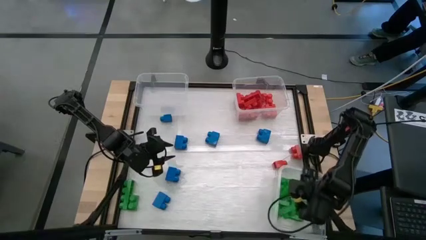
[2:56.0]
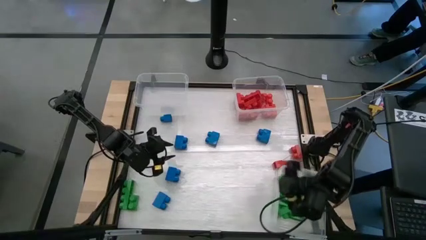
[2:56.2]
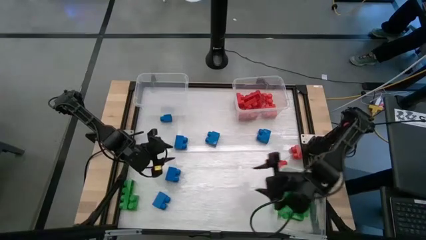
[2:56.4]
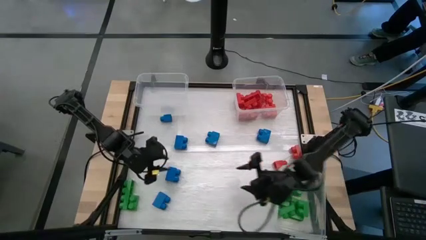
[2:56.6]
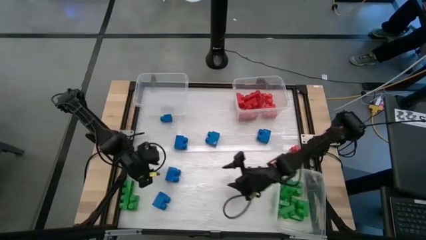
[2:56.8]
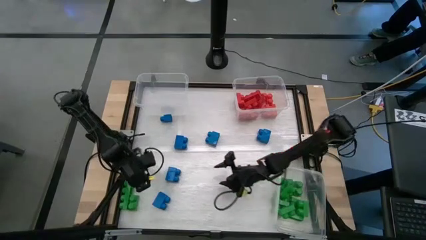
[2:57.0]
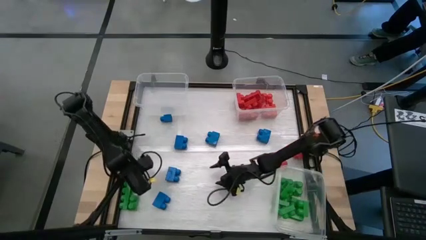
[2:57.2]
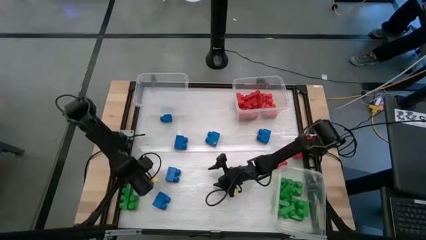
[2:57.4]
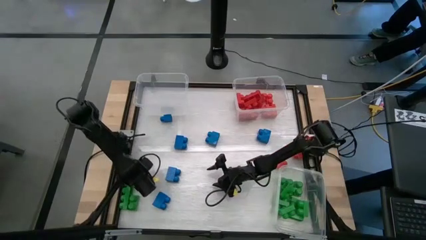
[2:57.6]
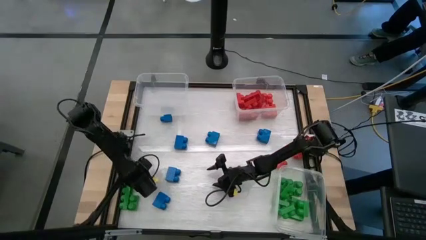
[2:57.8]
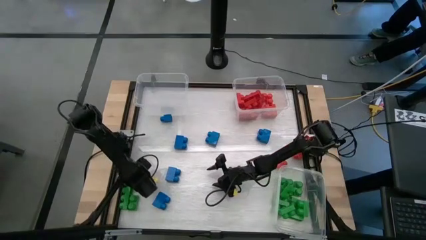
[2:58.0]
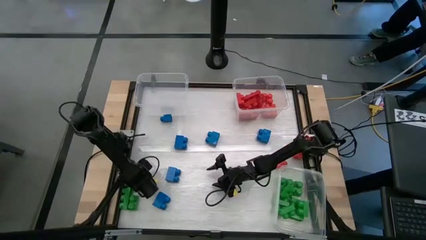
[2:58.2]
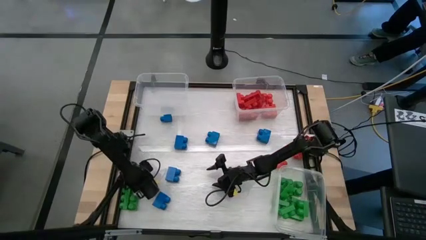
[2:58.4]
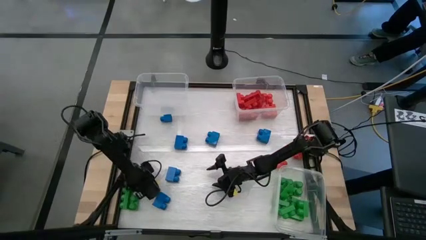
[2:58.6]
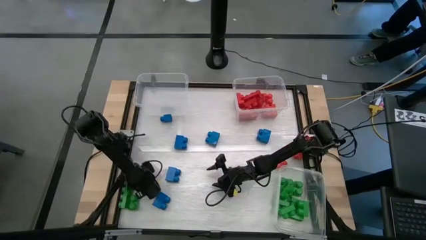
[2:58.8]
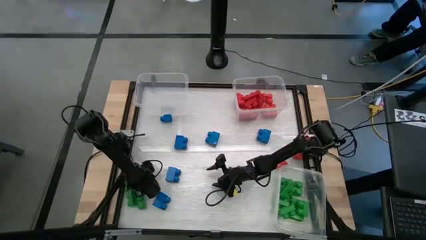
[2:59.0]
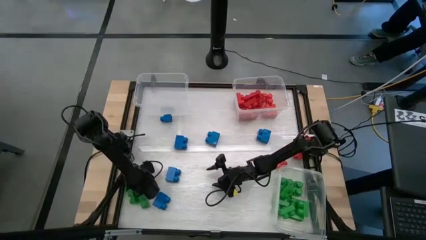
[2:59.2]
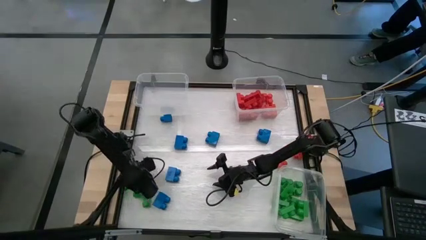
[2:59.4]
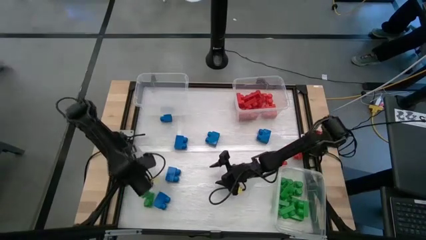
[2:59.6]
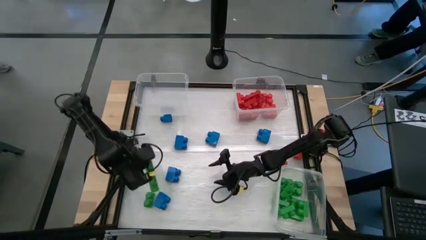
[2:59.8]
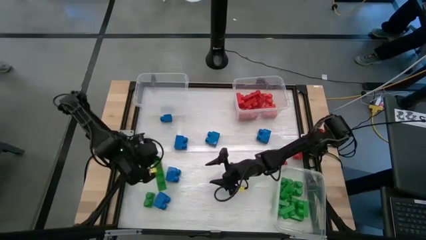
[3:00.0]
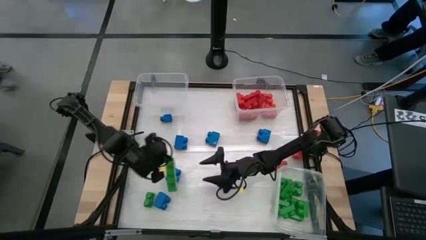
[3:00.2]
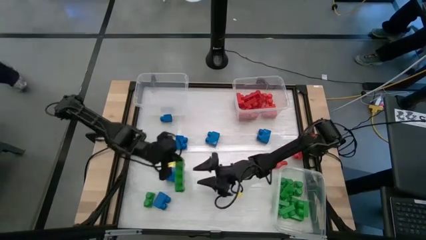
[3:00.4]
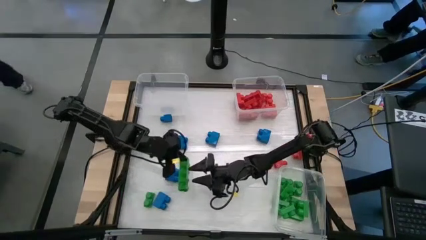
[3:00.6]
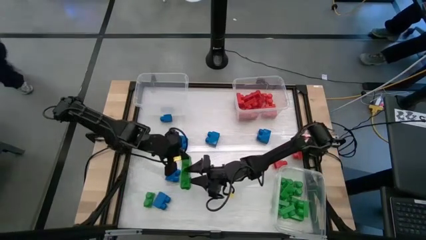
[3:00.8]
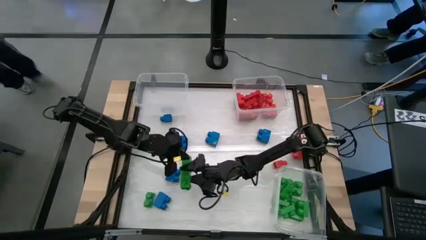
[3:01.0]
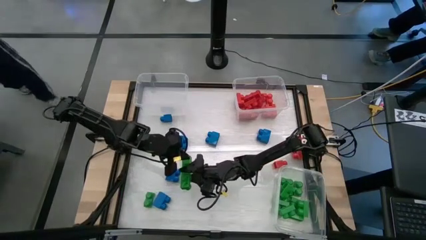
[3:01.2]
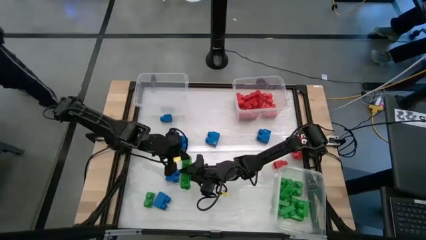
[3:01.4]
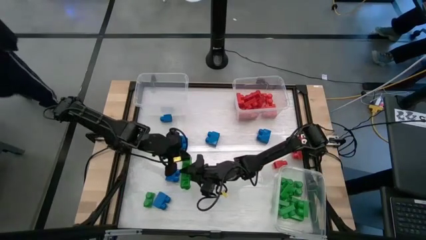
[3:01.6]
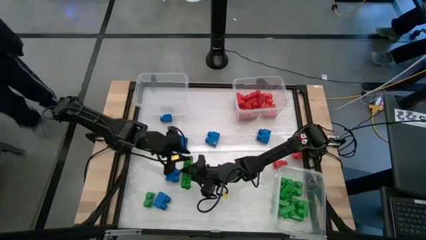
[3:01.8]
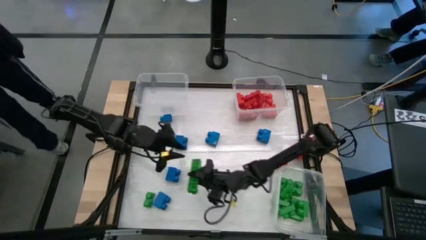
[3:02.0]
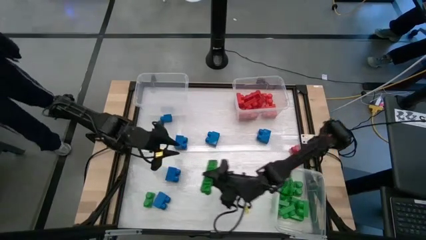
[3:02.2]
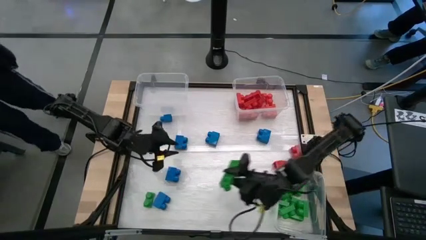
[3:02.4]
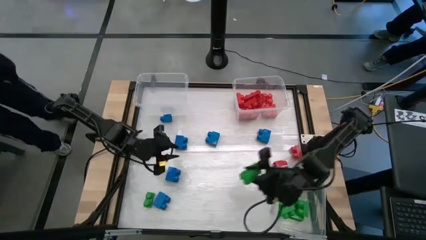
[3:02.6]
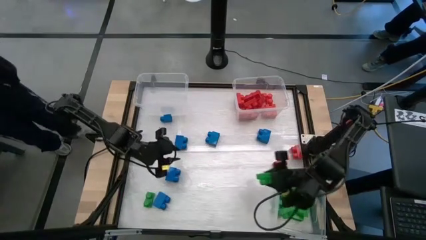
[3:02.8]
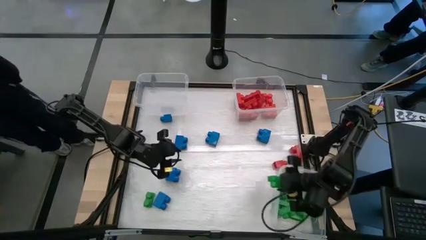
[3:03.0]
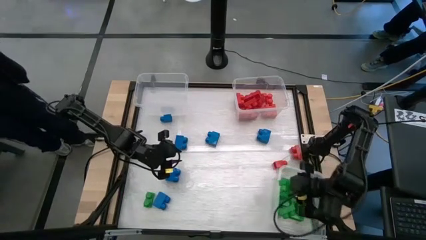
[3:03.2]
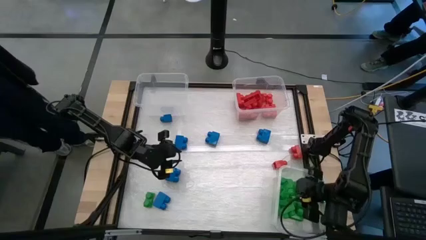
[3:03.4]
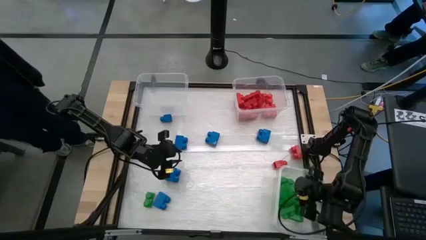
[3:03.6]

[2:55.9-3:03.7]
Task: Sort blocks
Put the green game piece into the bottom right transparent bin

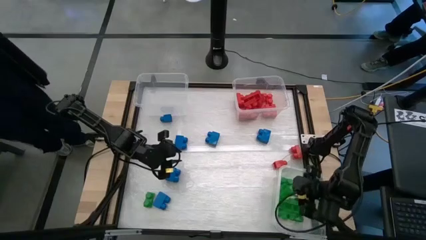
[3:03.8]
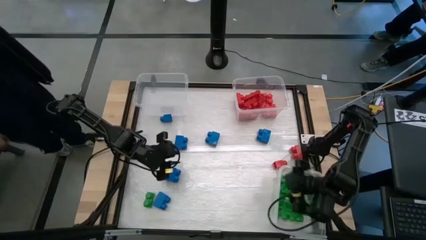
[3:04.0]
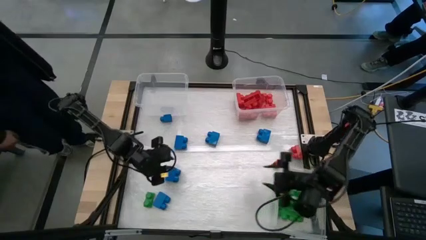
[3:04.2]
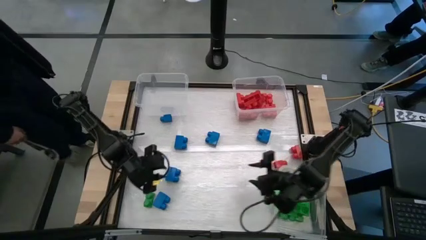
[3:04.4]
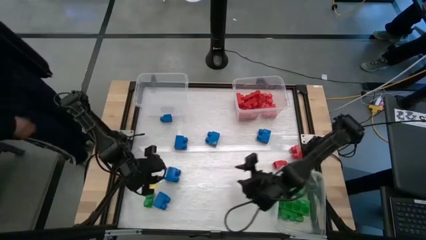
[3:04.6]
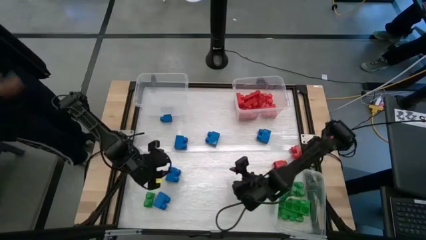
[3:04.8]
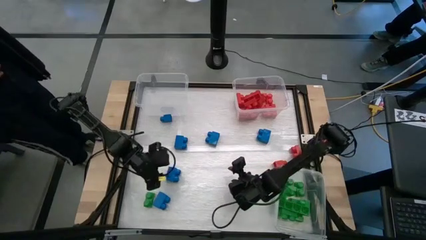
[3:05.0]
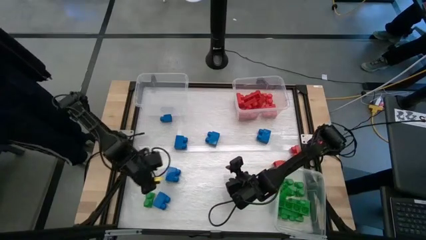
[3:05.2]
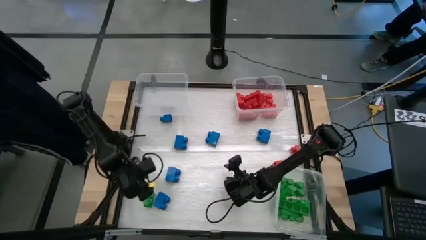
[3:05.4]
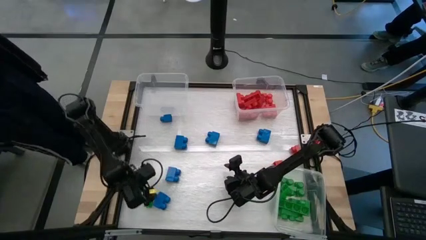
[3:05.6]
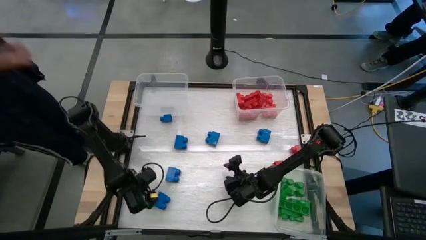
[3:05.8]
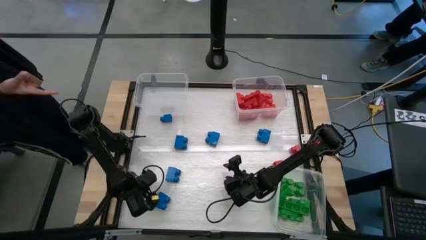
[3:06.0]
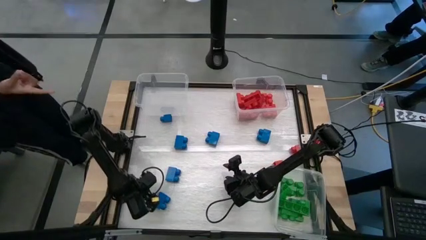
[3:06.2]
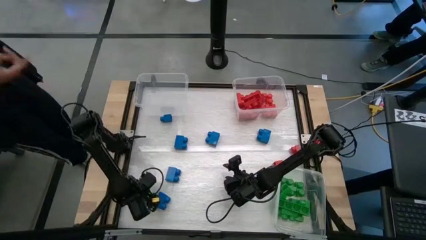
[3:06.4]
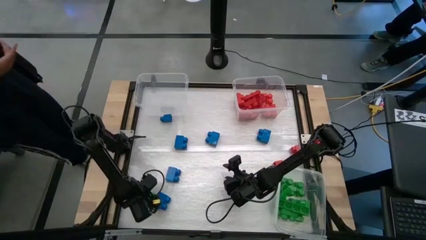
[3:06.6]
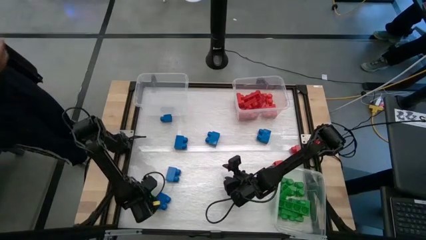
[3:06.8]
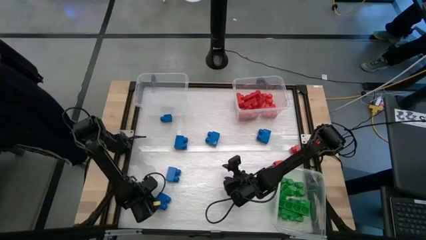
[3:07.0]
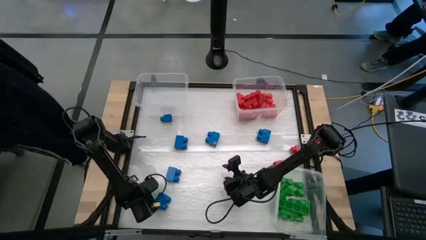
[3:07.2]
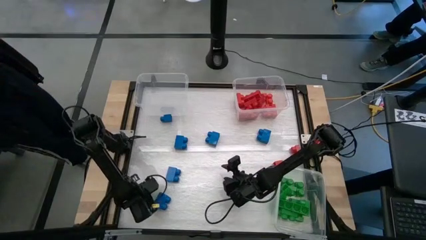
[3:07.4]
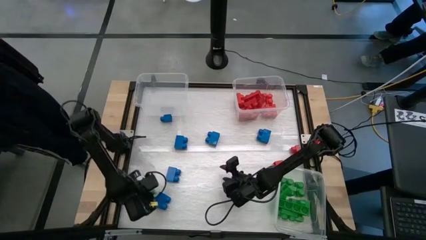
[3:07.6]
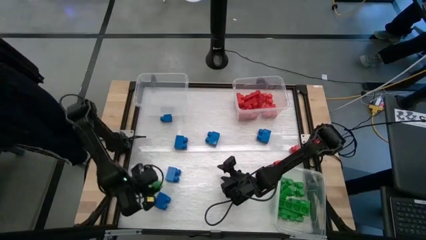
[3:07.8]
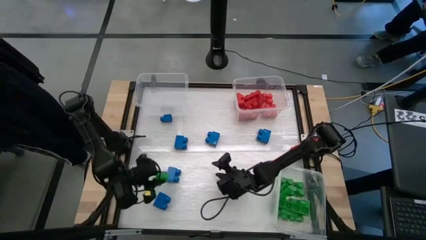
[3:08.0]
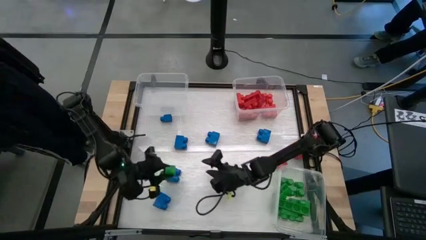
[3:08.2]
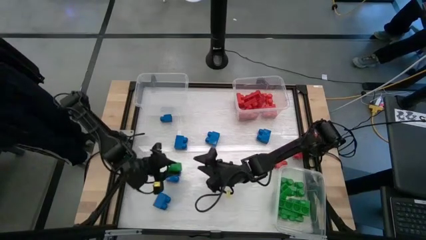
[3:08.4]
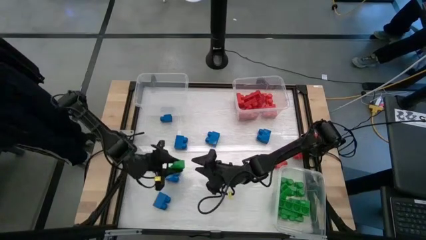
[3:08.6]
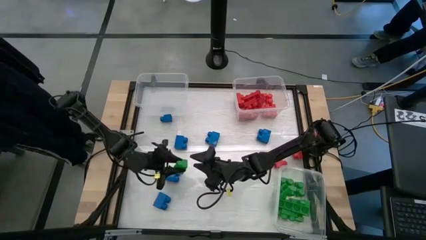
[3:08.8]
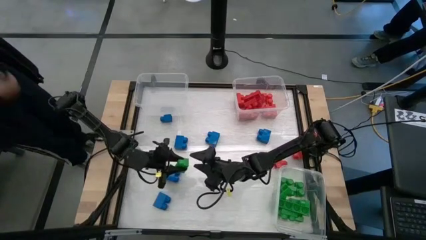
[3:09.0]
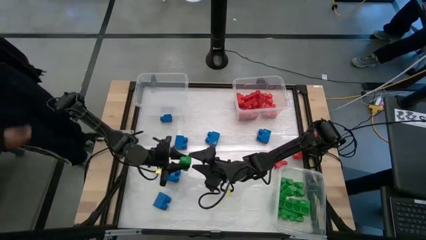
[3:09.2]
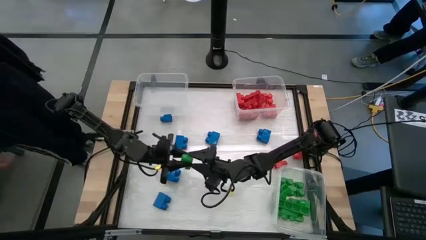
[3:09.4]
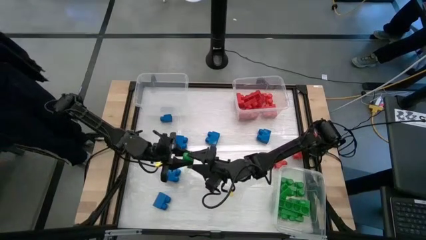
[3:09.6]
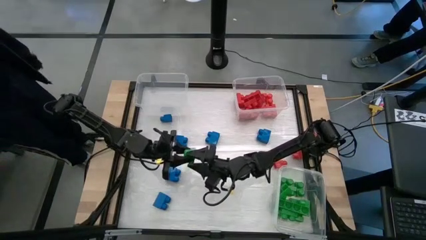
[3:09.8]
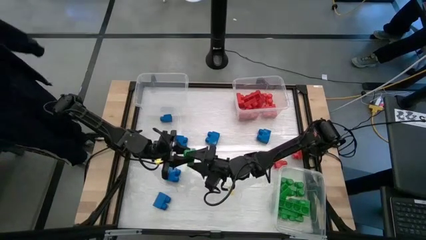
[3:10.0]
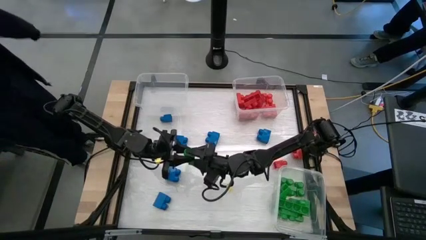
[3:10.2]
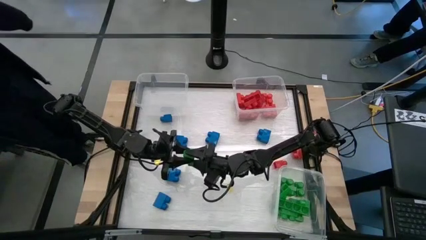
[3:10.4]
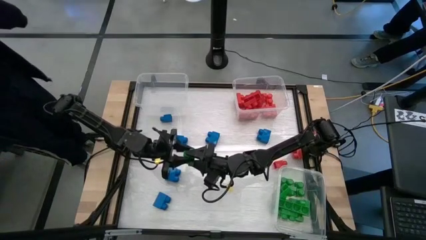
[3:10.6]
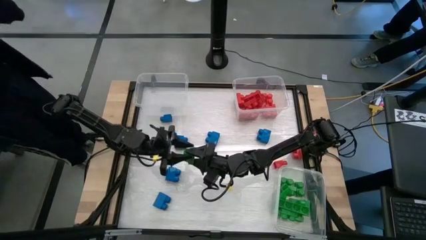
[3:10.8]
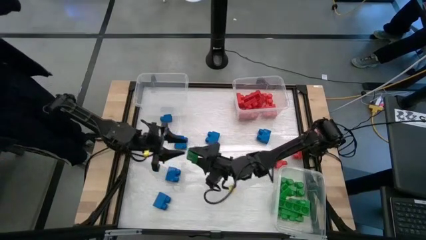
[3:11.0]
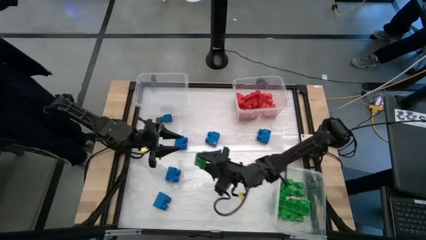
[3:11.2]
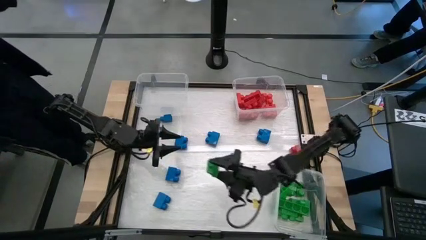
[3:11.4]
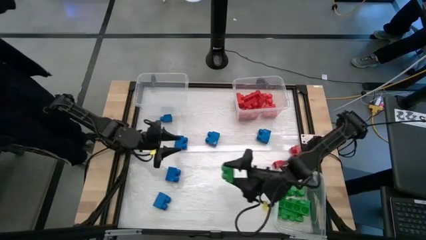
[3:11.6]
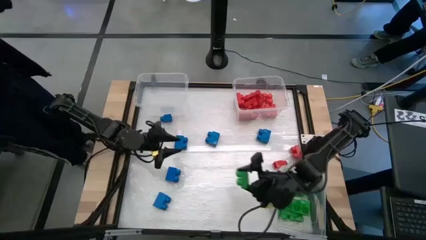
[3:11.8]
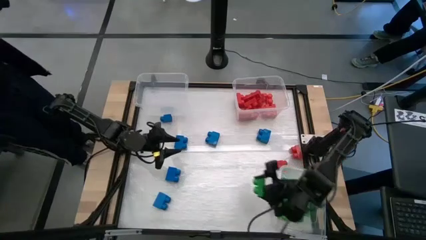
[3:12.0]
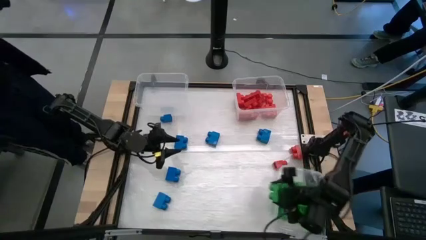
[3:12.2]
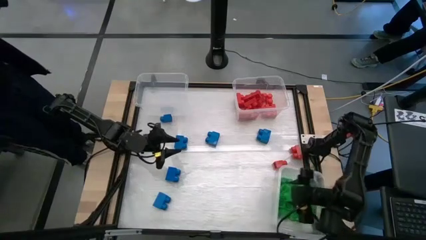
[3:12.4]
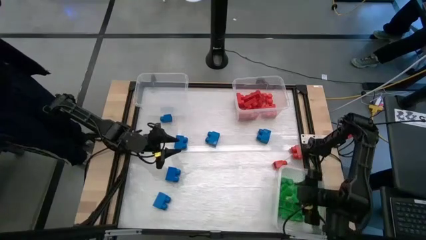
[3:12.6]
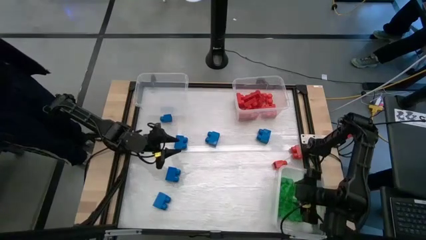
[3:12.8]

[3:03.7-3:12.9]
Put the green game piece into the bottom right transparent bin
